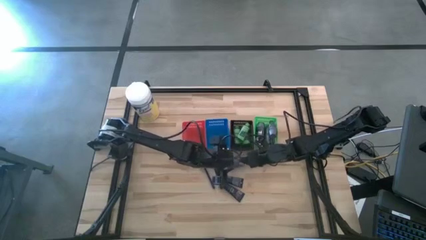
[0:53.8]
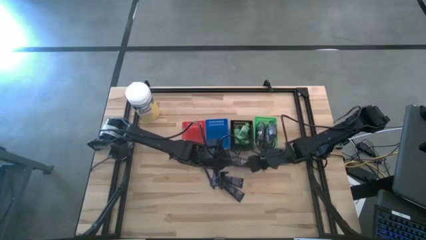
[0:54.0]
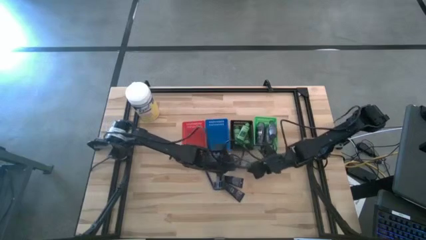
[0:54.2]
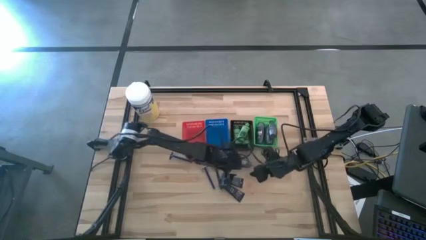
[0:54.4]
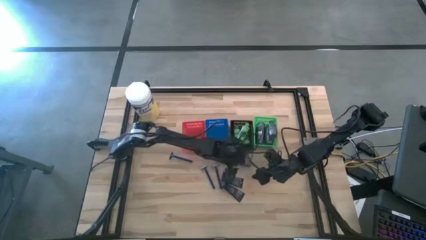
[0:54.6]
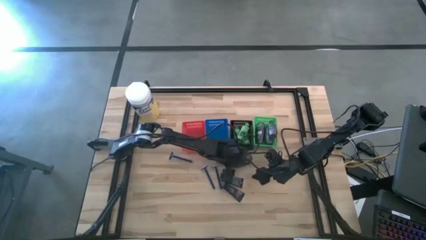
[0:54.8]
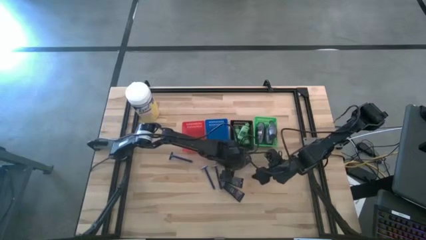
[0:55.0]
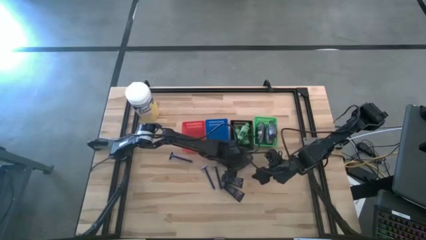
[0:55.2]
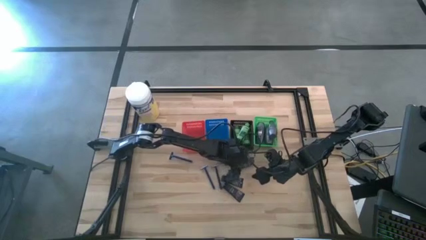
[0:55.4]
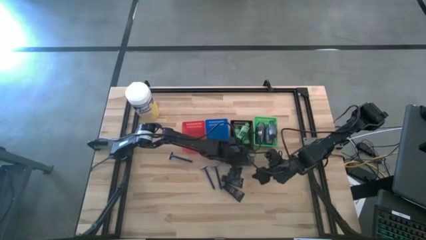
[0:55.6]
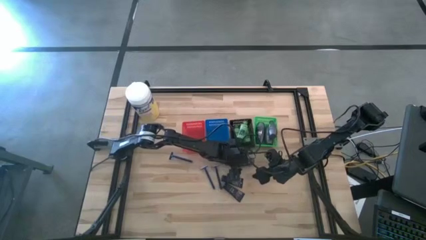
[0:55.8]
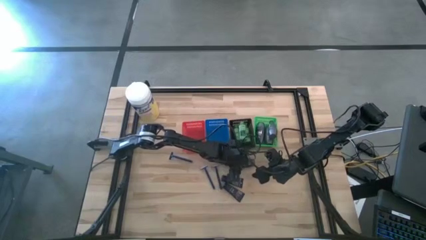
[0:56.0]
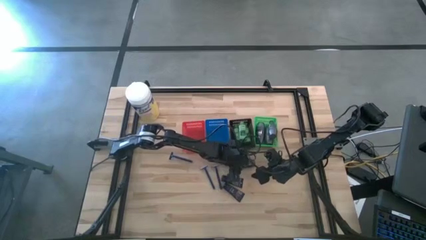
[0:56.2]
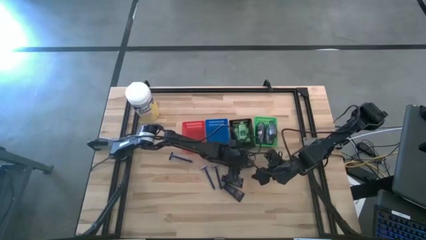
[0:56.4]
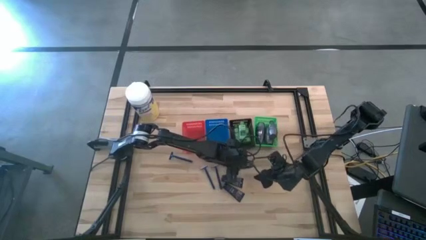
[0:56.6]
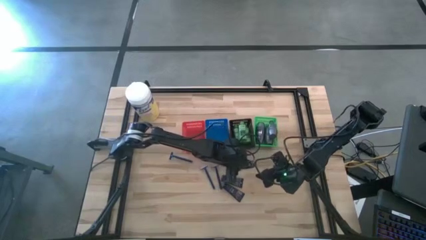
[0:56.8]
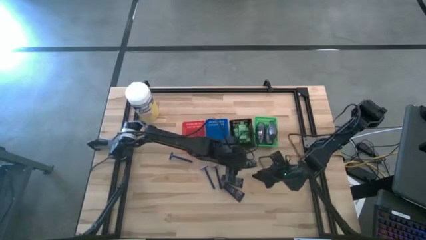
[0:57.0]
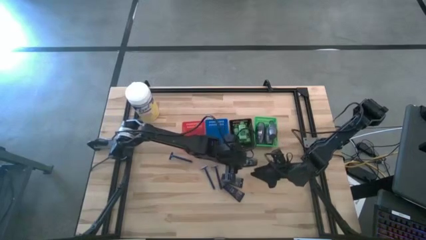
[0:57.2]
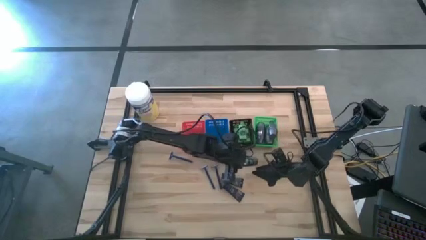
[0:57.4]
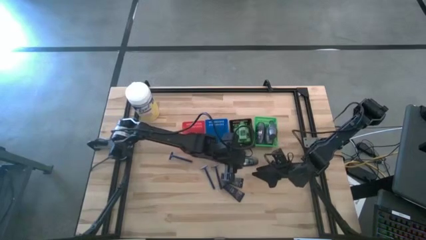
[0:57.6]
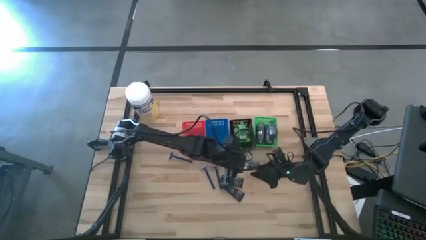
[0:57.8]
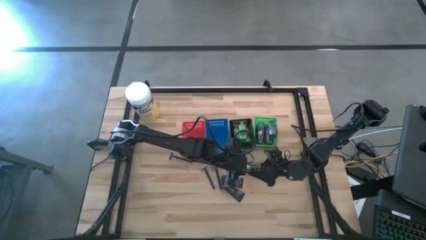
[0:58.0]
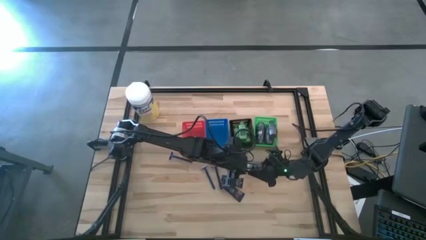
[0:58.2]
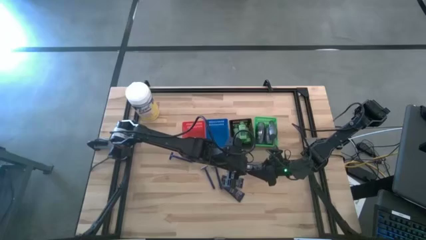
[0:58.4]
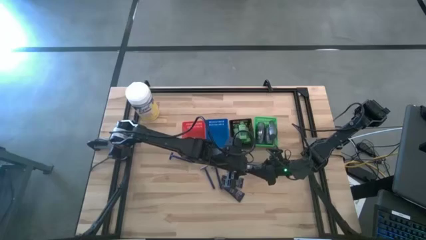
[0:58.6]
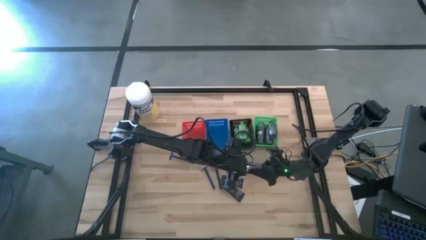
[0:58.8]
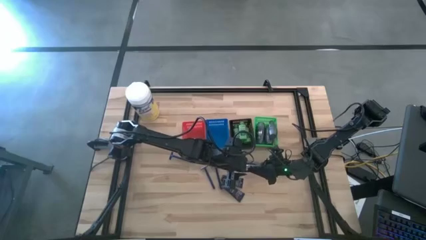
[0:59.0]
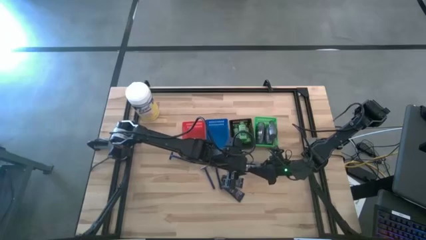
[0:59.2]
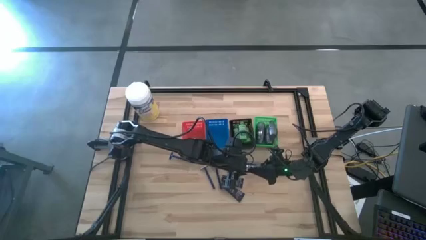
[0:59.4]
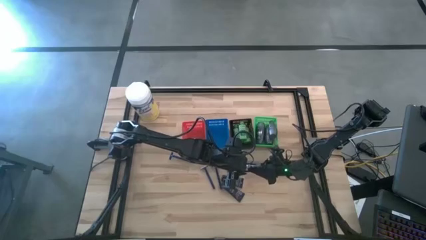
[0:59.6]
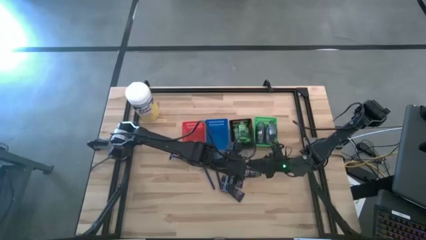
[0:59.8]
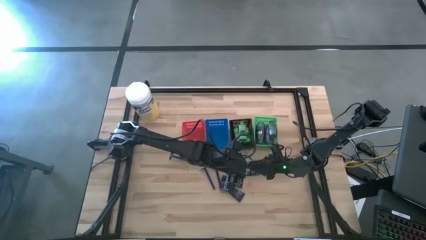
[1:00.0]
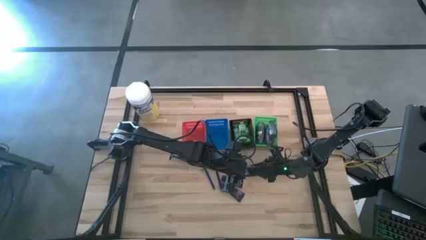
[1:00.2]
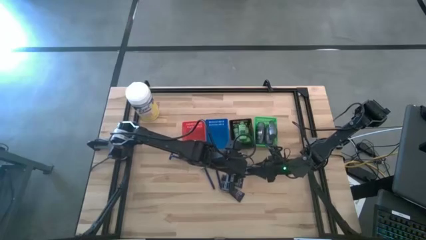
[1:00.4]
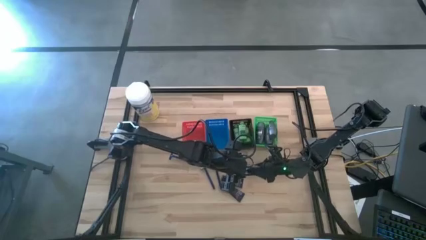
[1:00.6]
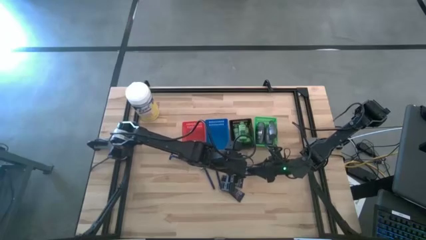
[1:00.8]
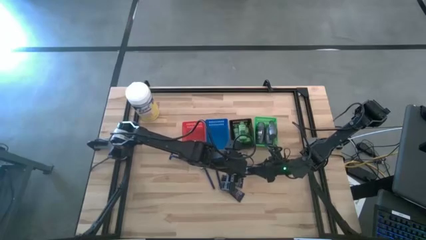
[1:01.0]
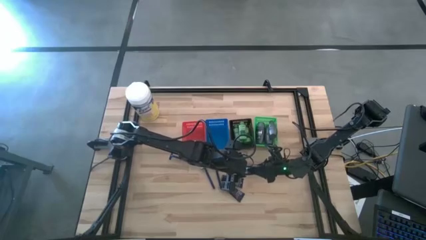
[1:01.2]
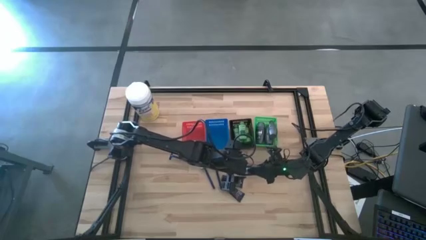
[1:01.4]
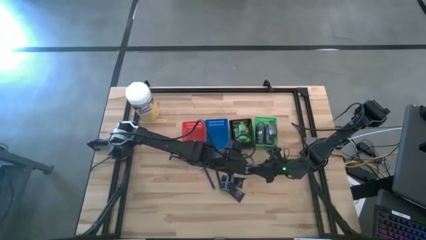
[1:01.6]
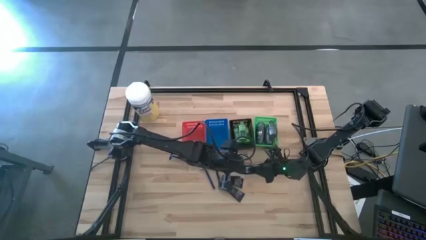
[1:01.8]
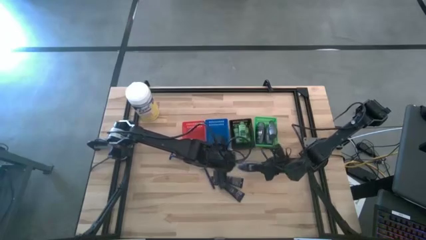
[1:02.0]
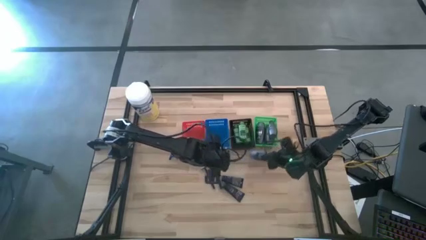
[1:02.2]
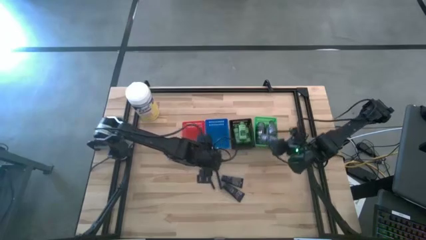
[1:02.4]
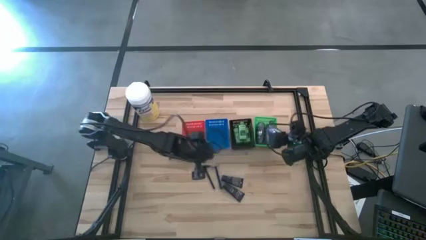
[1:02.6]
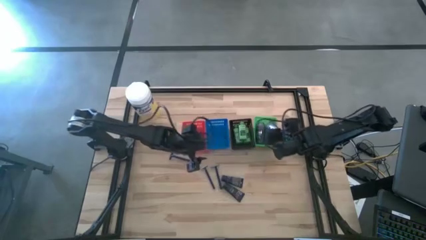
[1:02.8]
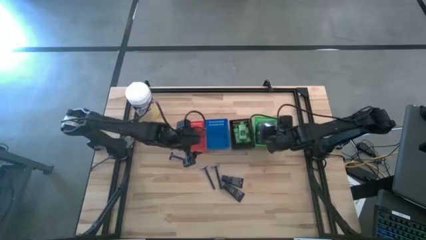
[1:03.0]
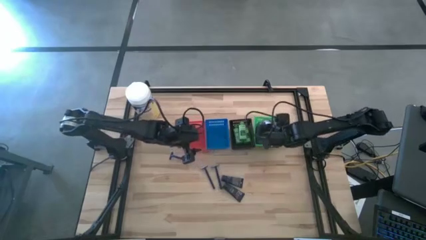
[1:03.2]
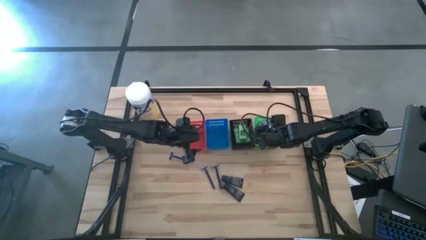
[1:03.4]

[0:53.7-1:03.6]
Task: Pick & Place Travel size toiletries
Put the deodorant into the green basket

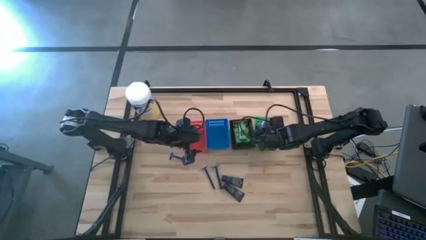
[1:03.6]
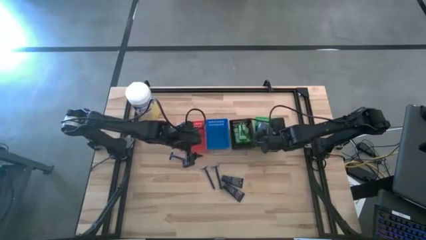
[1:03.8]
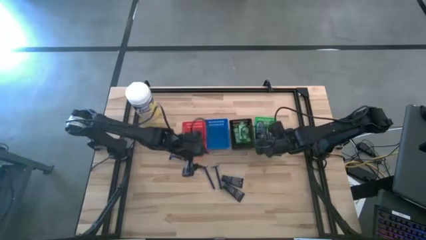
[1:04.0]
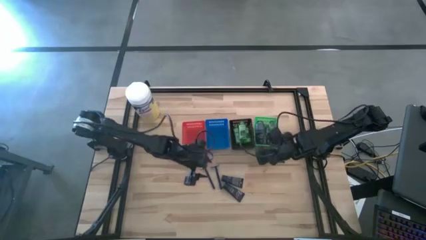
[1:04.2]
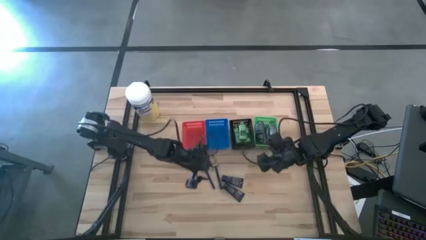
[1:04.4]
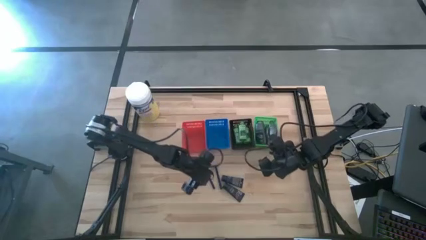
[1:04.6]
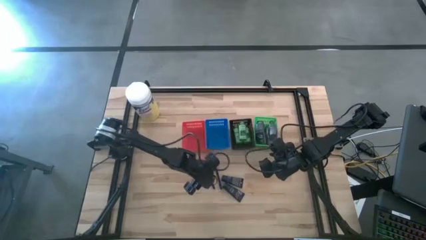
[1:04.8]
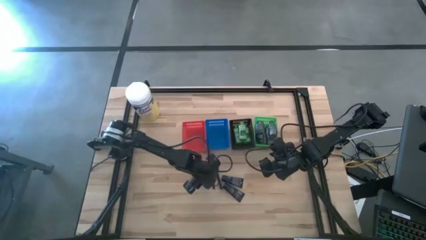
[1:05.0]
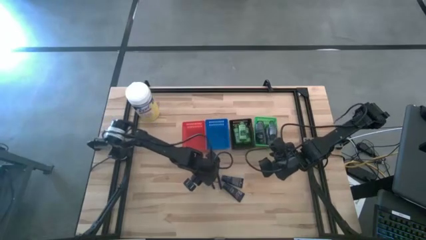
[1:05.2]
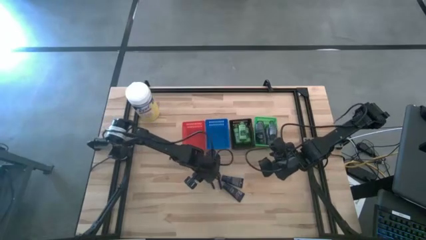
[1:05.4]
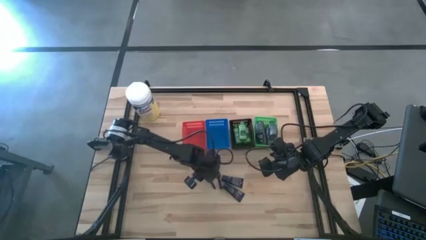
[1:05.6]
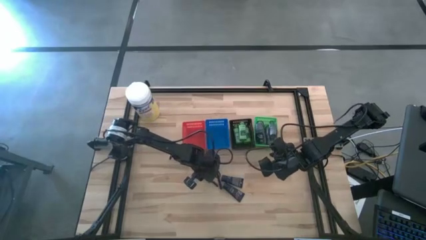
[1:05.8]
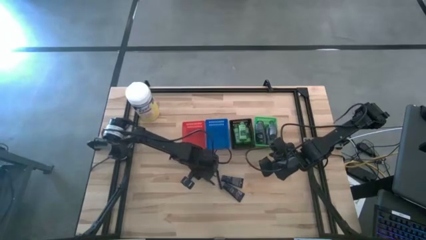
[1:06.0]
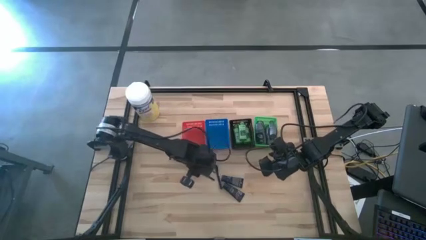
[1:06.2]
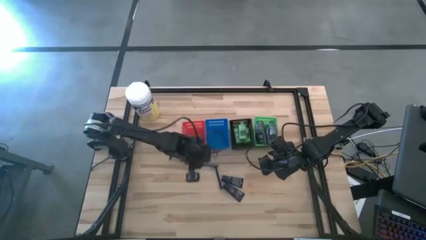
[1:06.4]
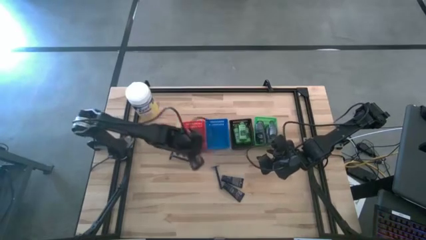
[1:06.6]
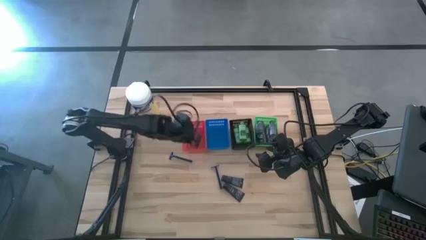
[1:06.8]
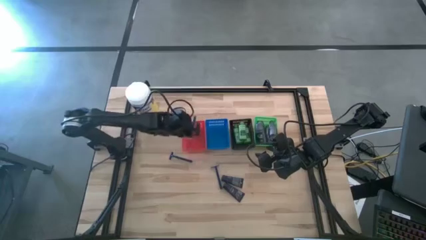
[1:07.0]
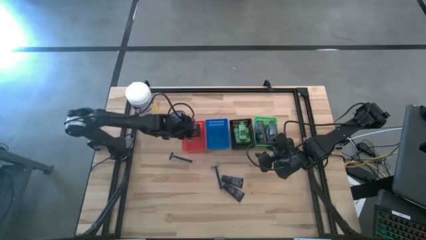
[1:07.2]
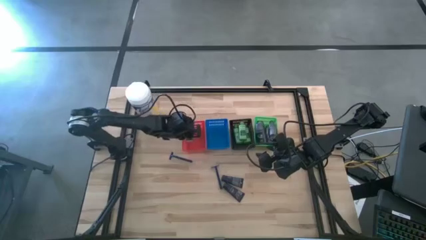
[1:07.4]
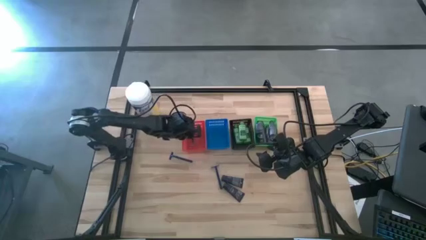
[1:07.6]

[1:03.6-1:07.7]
Put the razor into the red basket

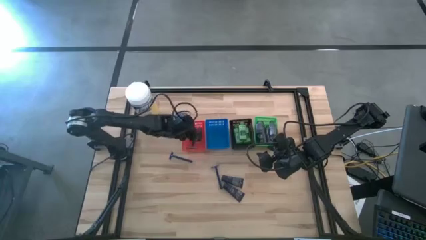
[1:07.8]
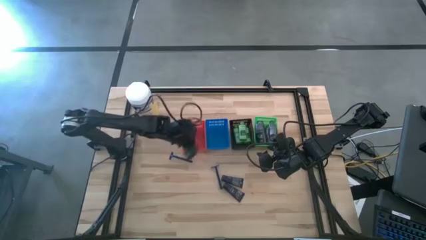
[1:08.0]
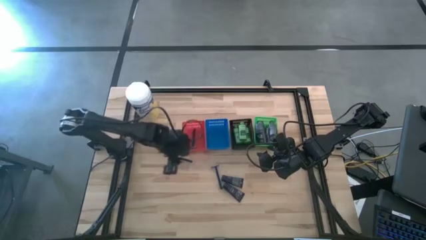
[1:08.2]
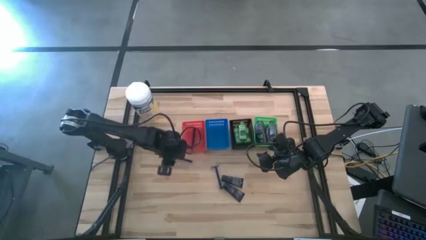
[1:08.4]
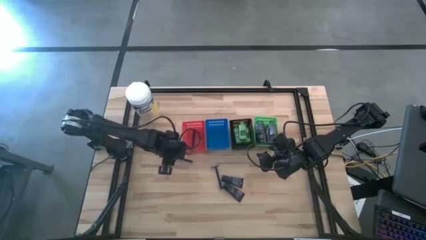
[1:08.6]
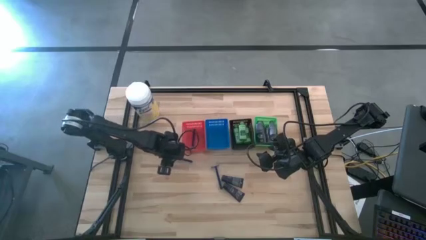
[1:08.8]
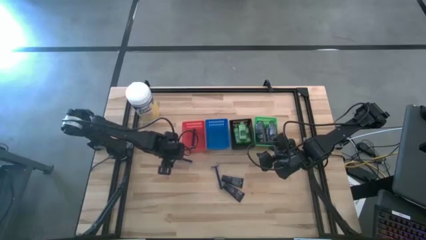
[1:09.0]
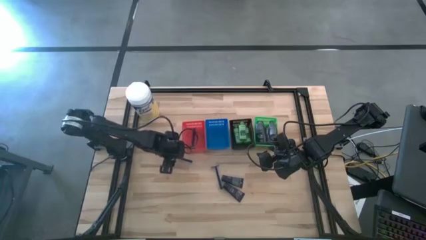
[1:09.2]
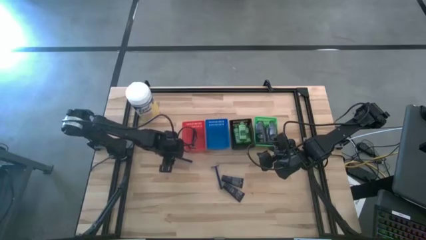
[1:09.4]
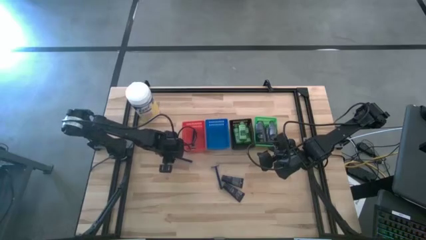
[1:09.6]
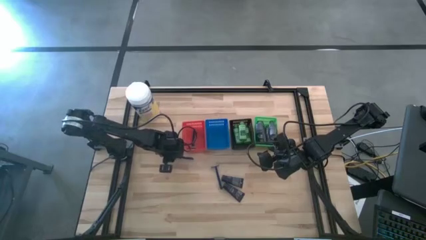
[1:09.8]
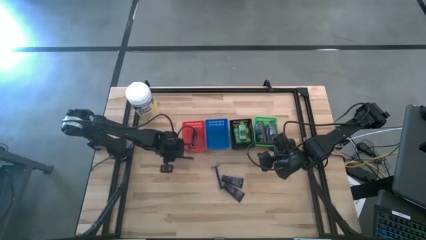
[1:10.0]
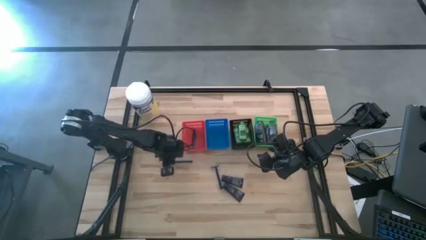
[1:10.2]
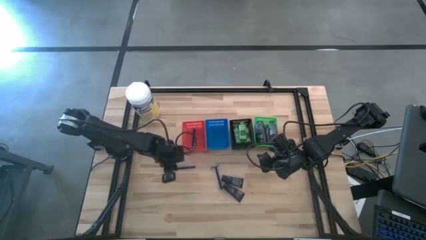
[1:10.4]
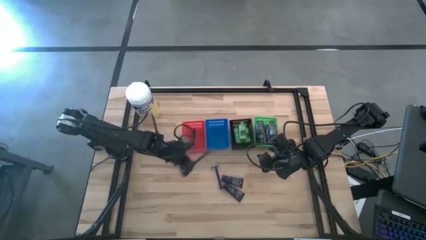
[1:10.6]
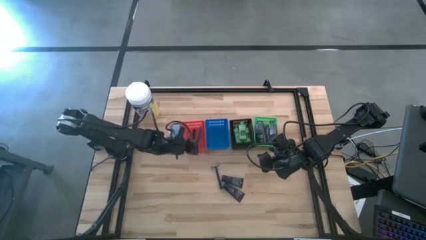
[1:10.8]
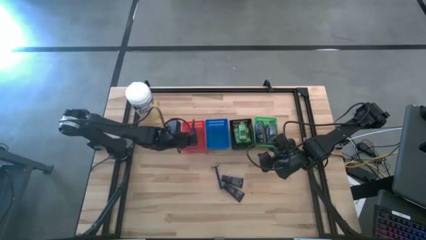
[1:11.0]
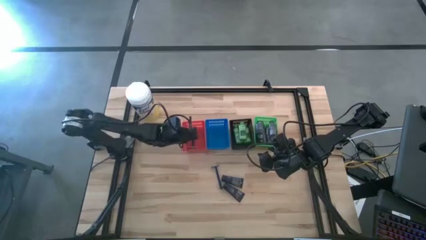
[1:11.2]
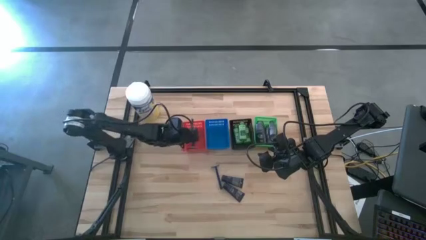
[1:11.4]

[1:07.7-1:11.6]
Put the razor into the red basket
